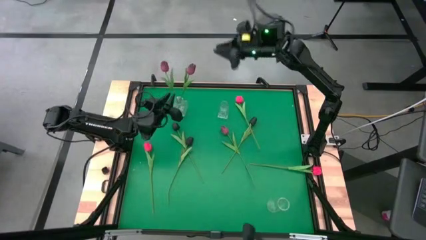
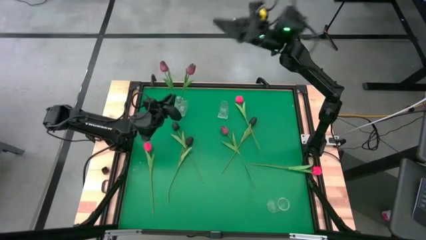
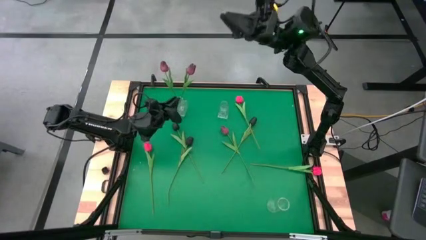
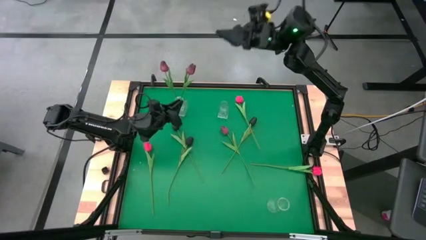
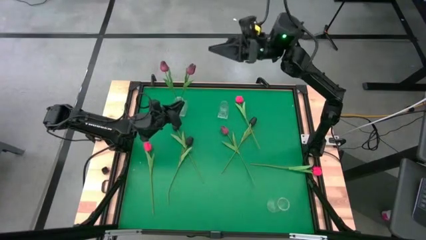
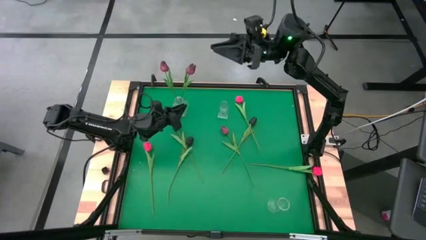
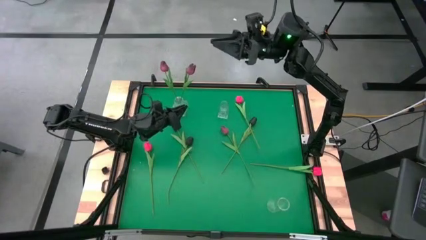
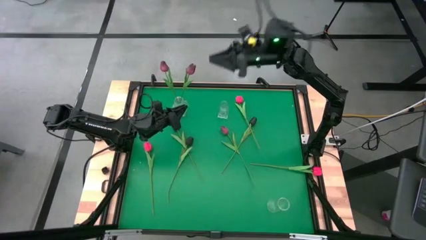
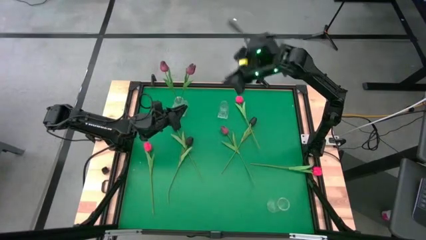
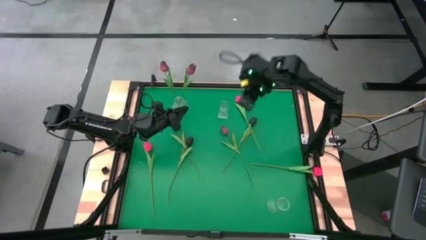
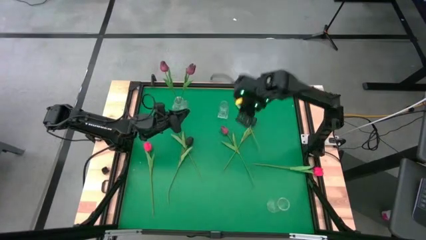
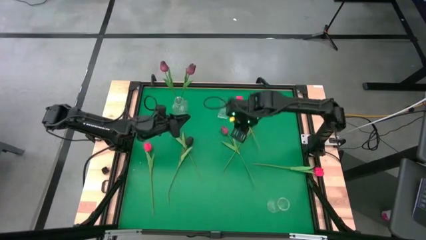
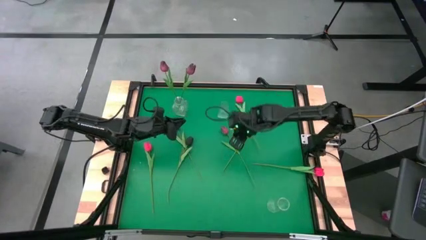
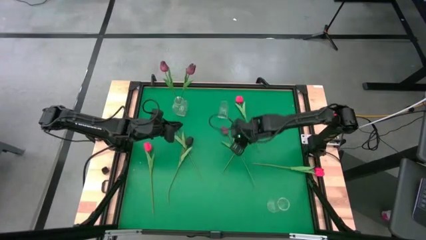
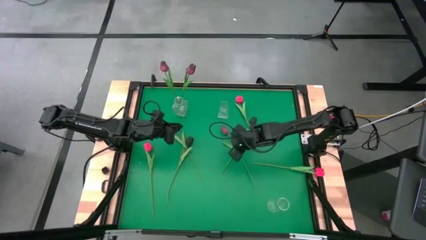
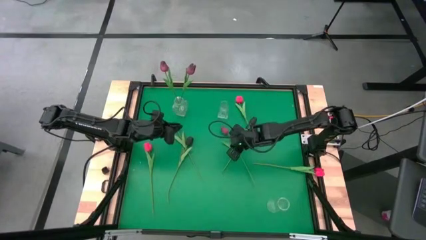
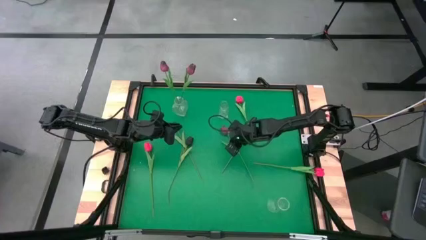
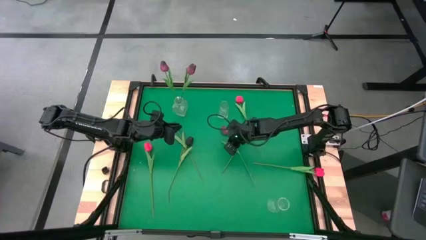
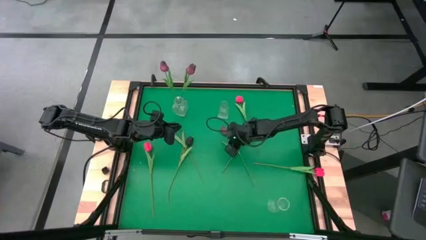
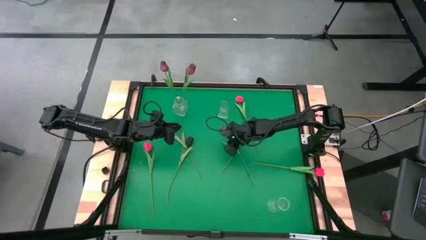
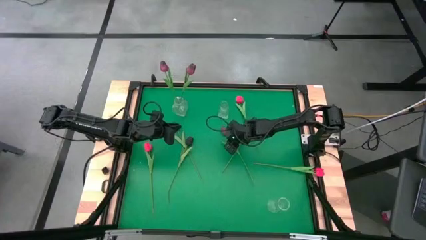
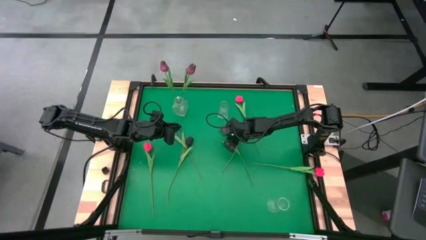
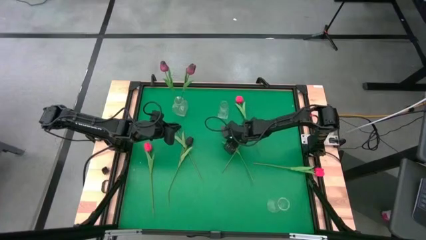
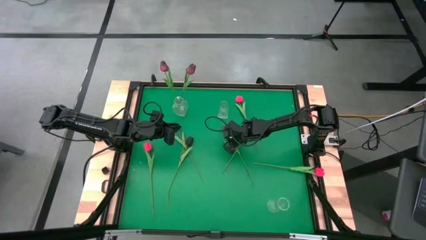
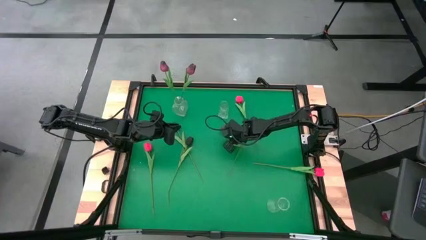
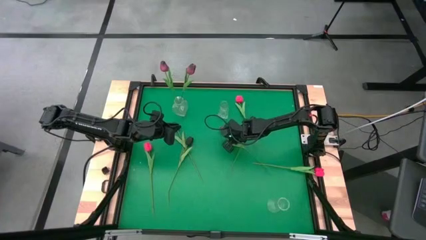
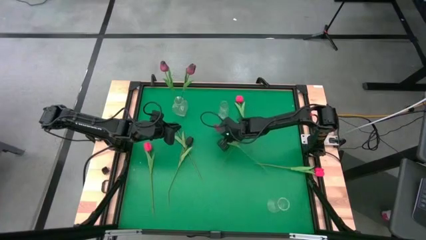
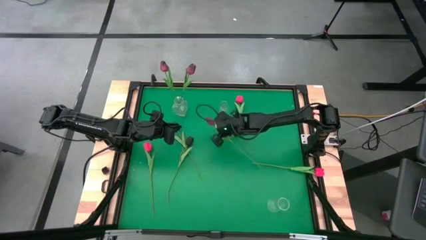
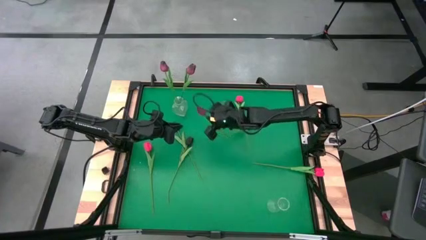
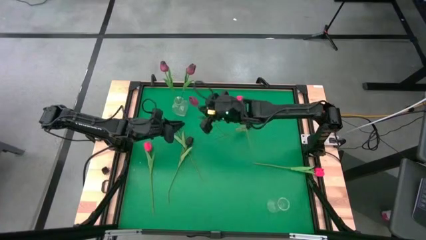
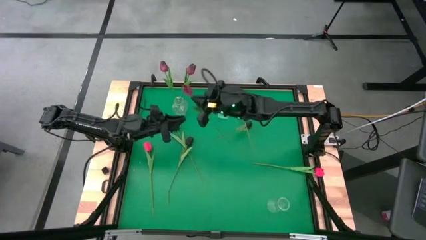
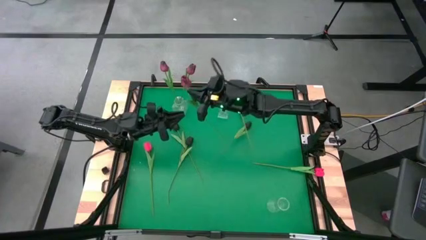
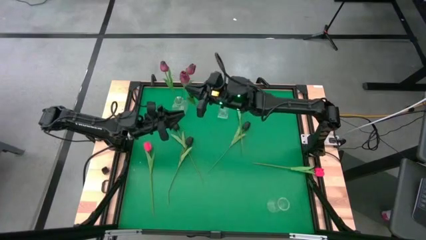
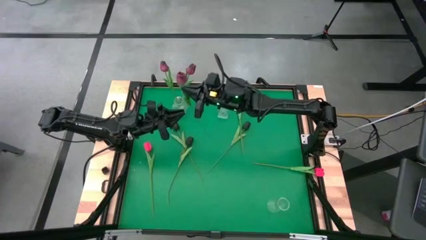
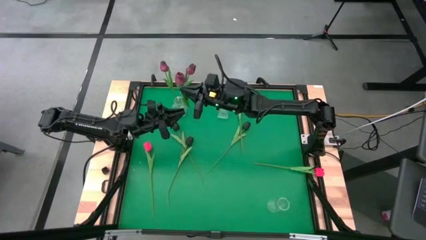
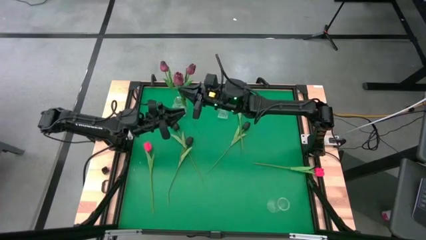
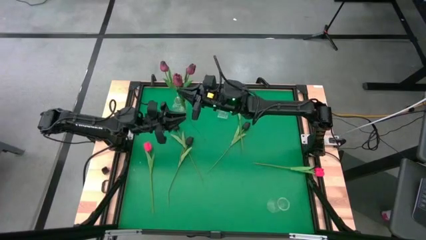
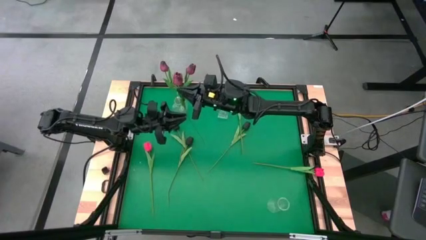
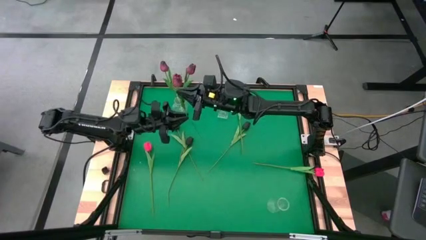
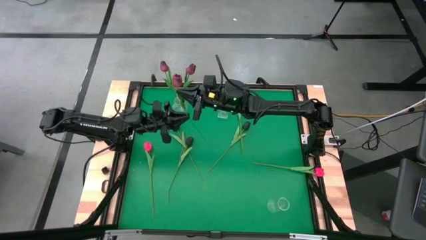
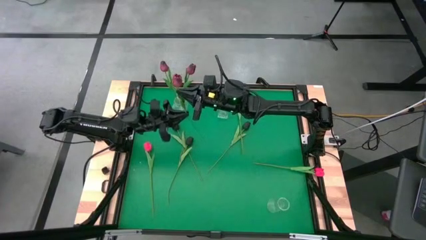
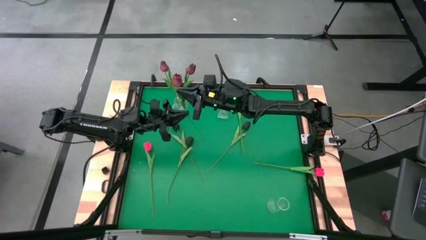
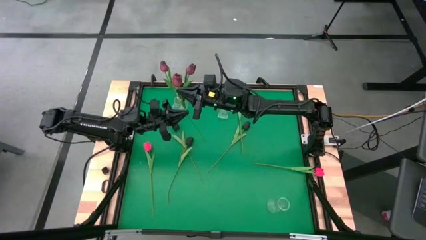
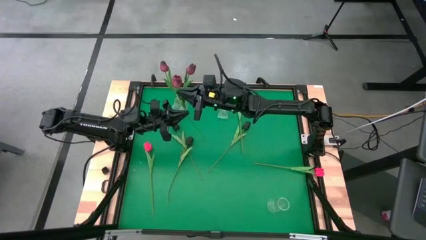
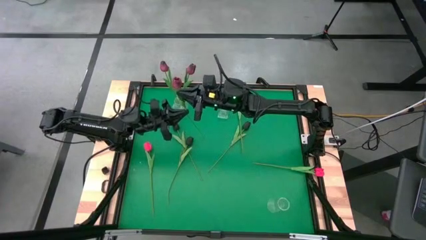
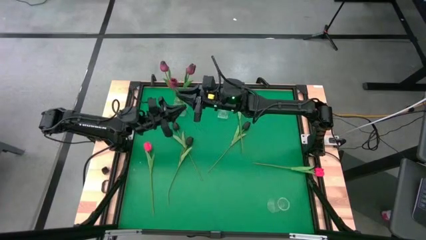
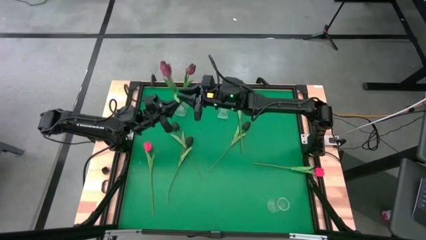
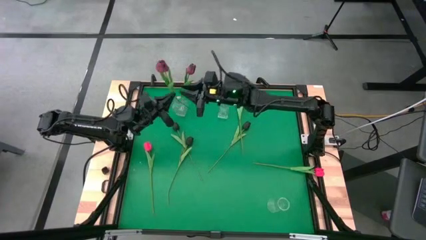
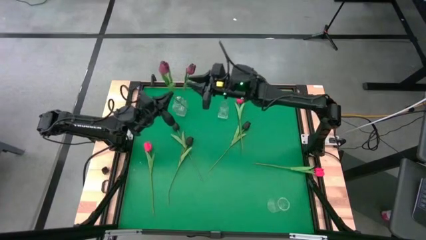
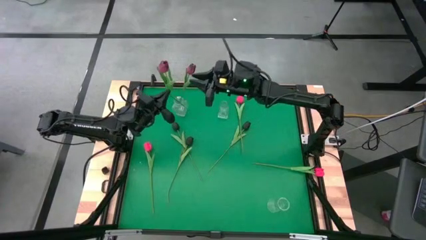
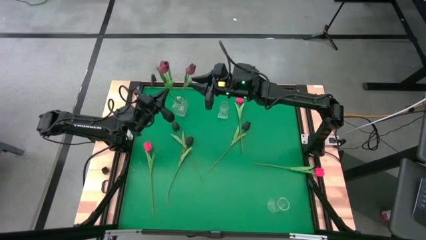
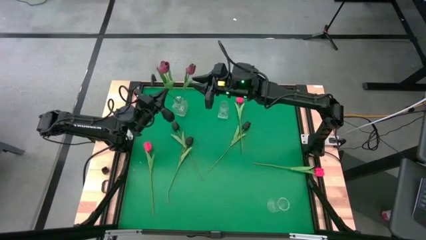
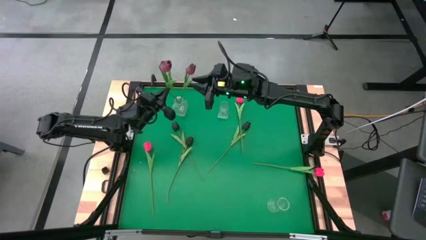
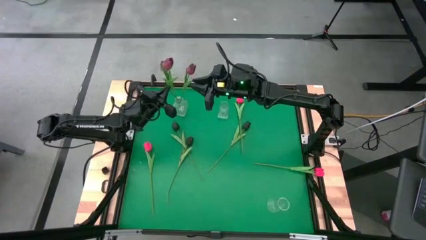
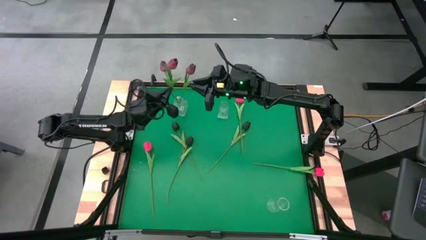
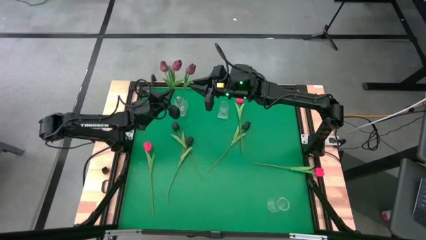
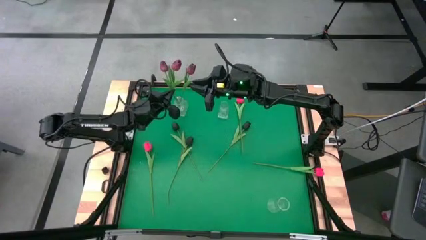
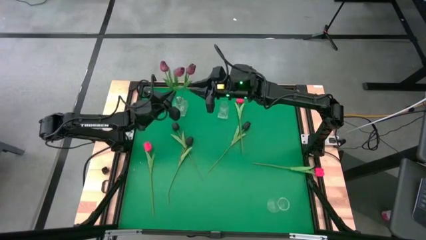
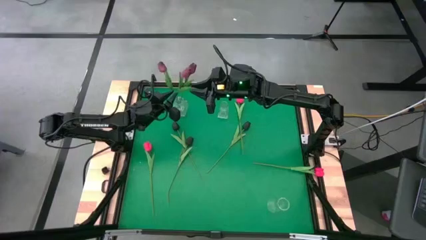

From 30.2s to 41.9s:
Task: Sort flowers into vase by color
Put the dark red tulip into the top left transparent vase

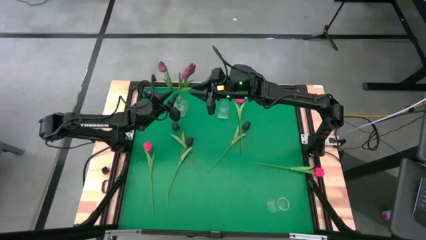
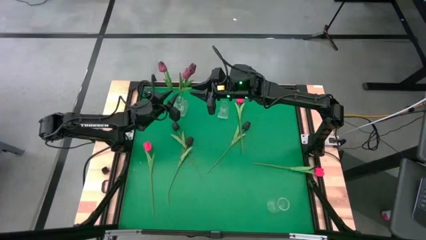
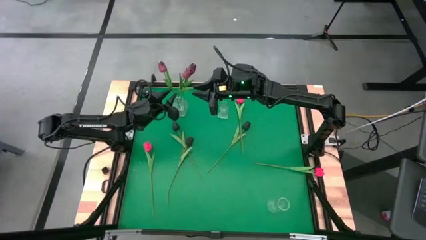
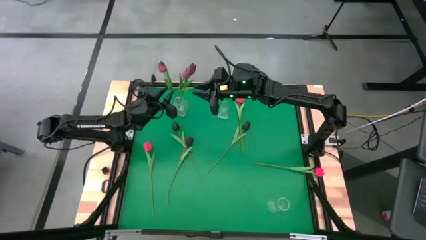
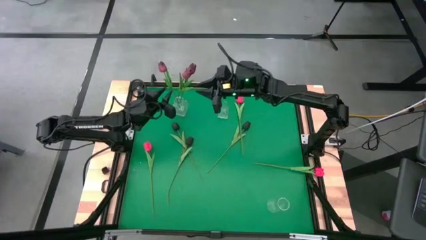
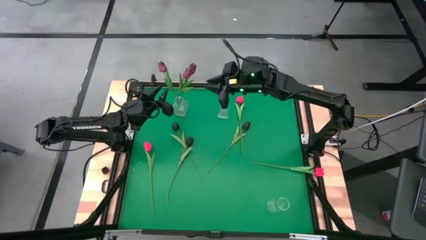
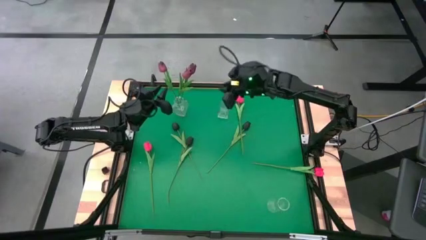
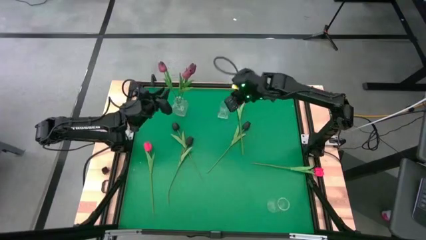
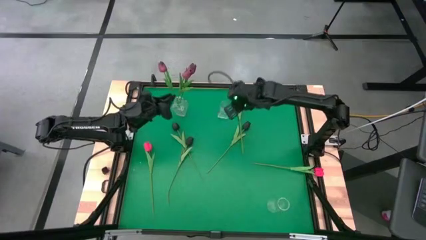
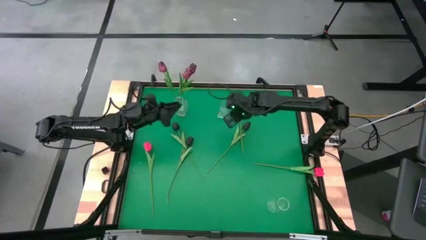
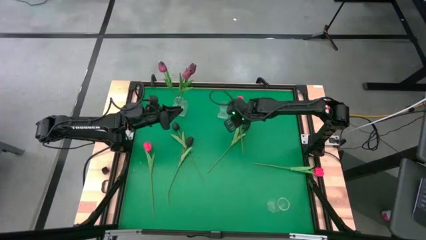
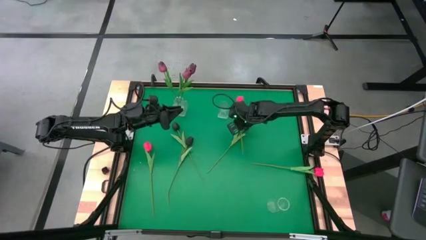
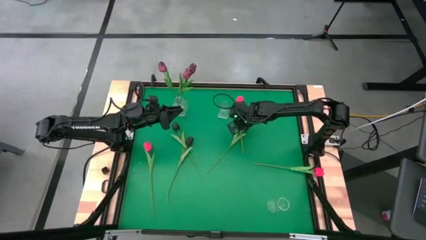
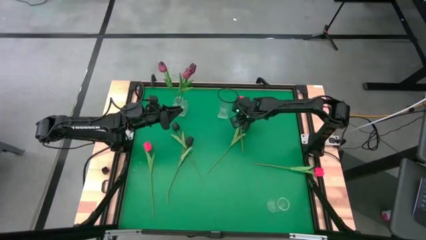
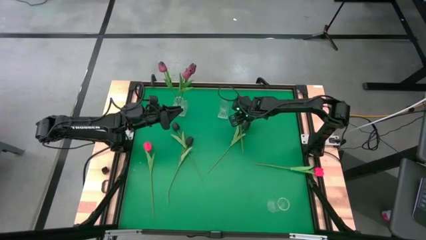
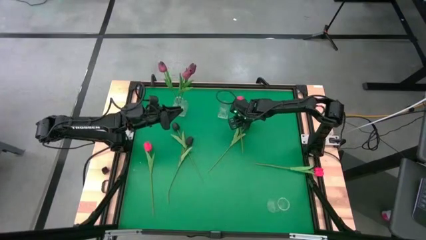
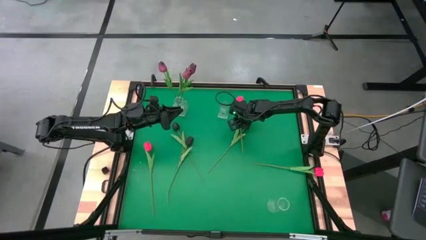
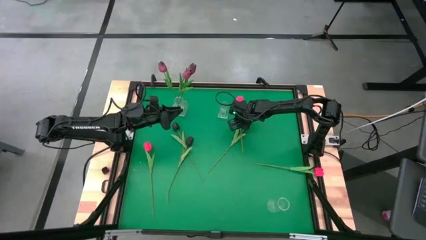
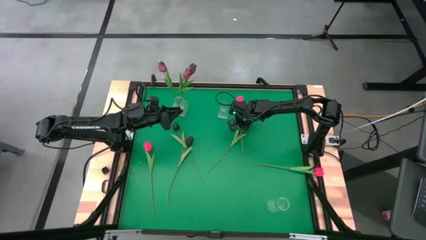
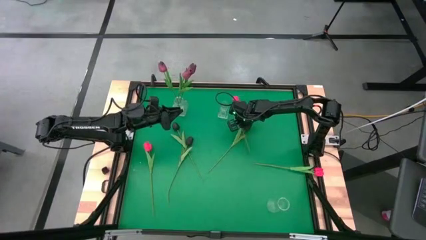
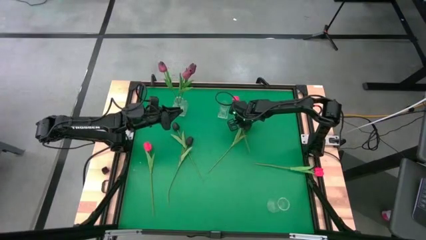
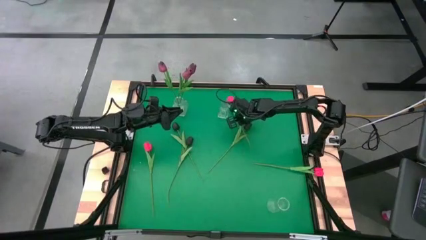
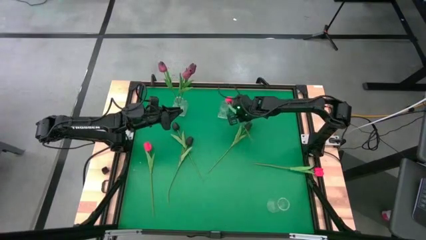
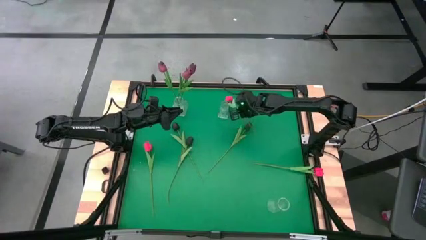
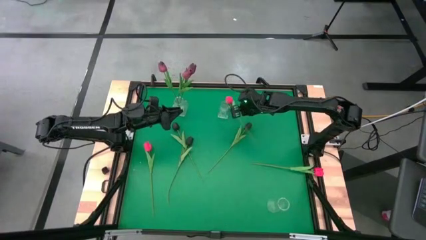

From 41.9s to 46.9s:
Put the middle red tulip into the top right transparent vase
